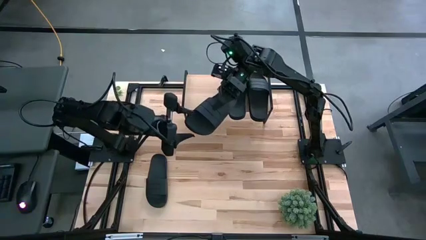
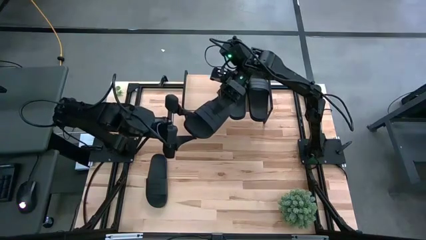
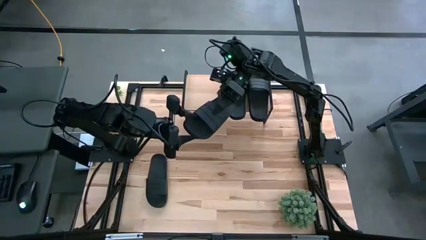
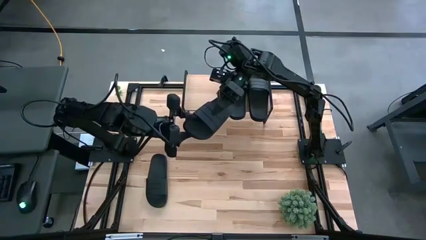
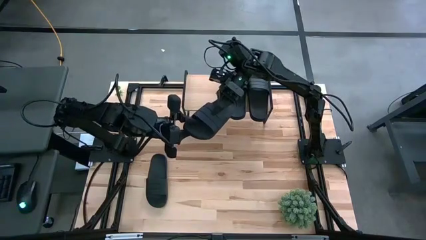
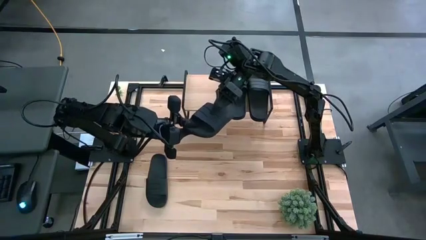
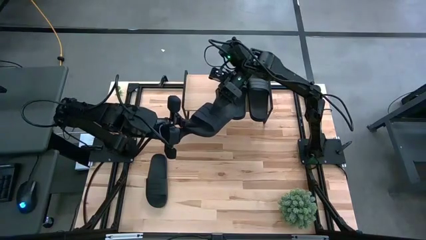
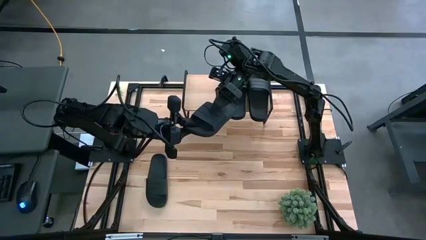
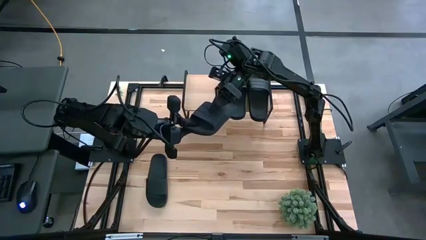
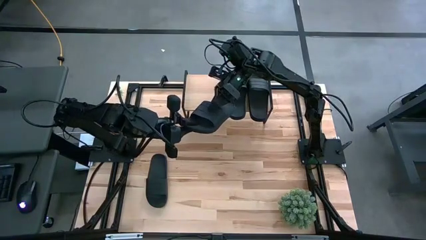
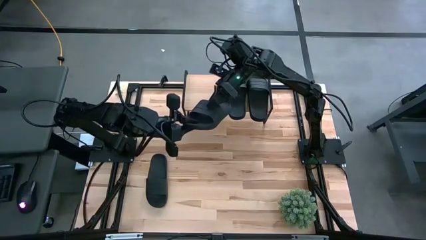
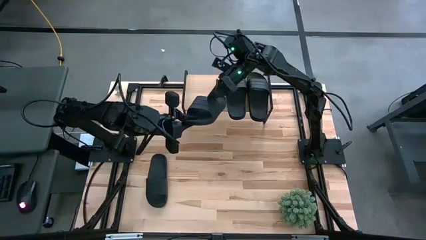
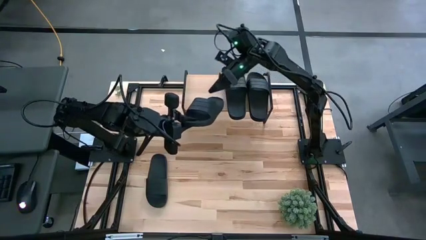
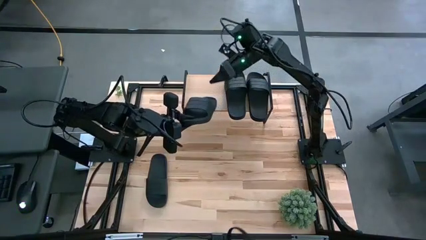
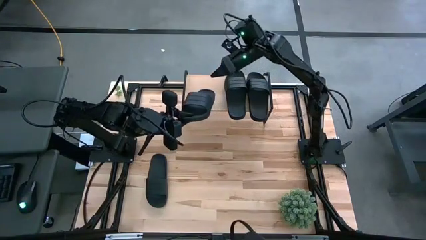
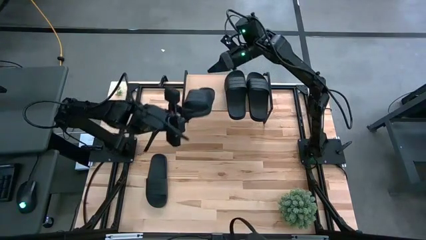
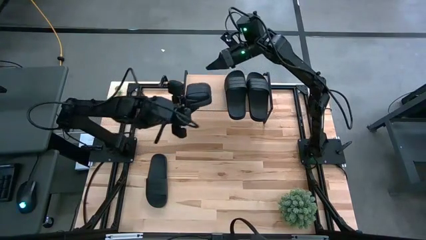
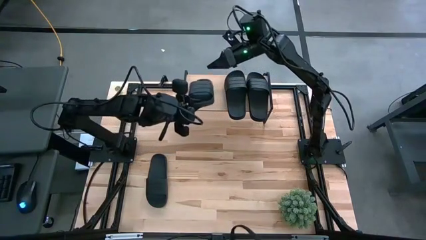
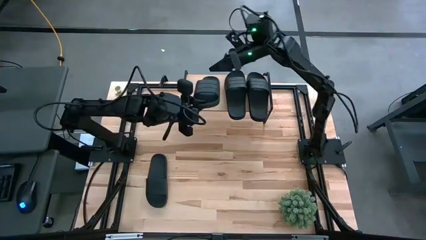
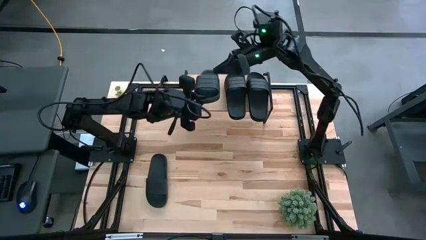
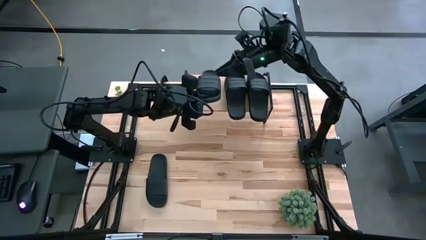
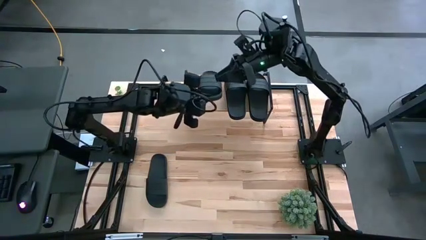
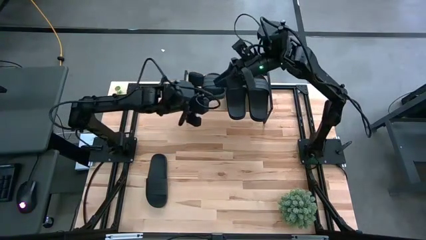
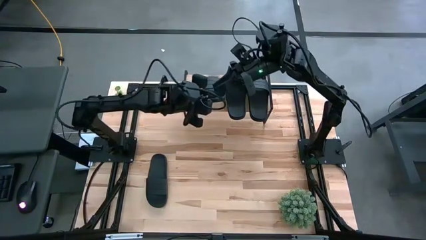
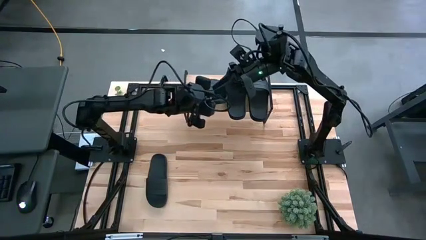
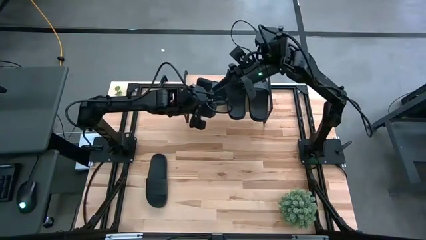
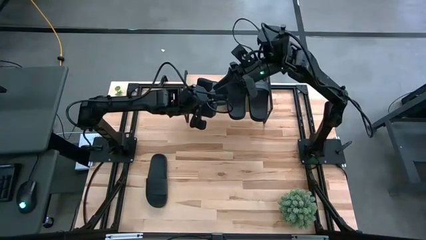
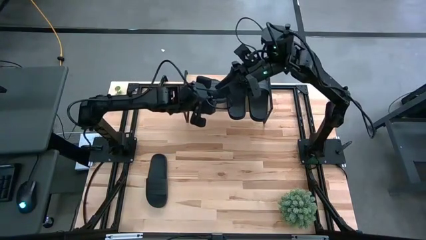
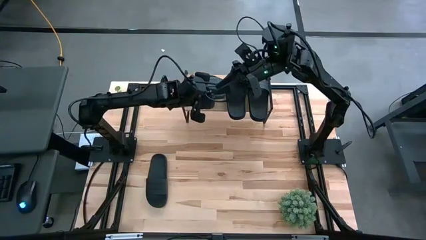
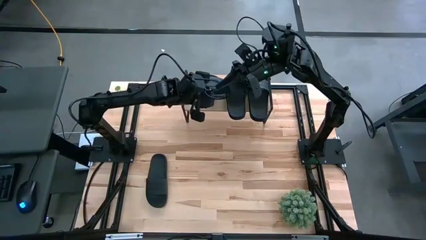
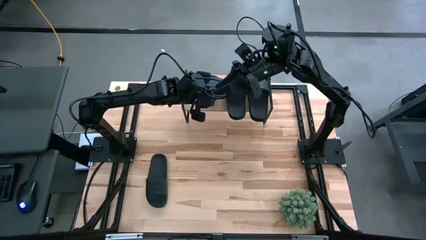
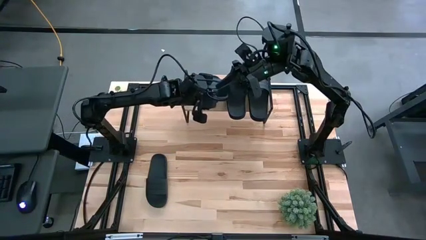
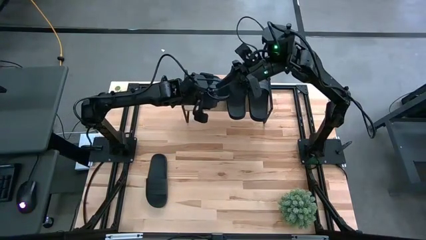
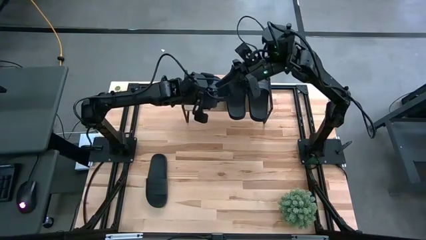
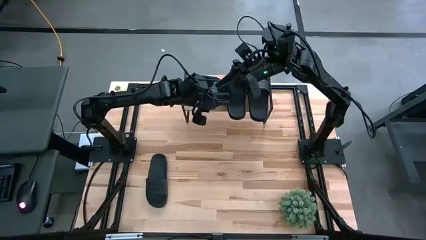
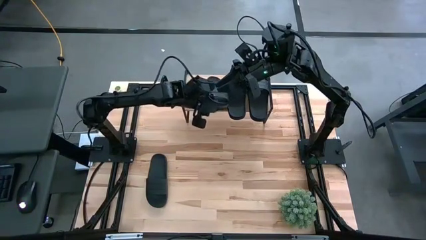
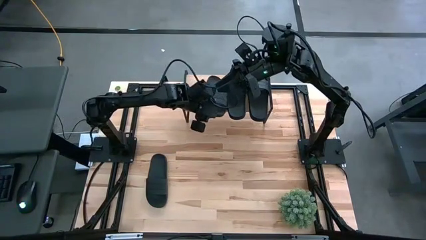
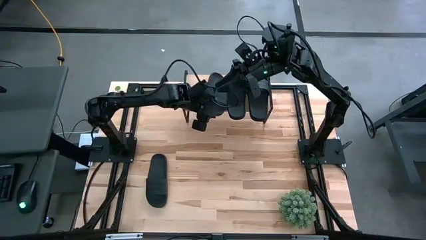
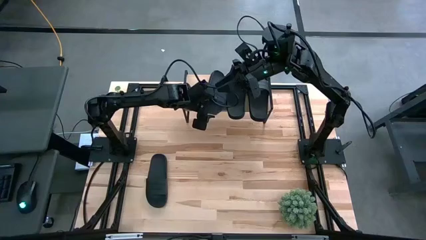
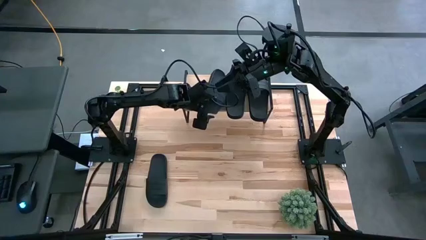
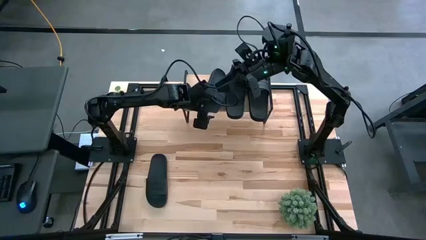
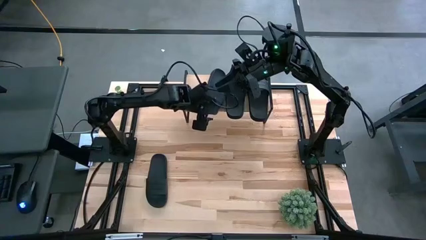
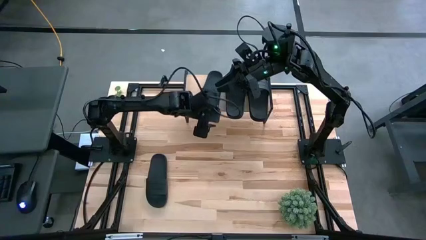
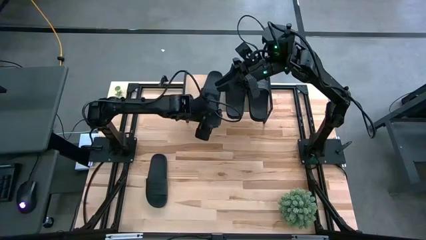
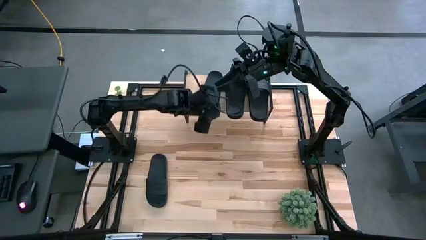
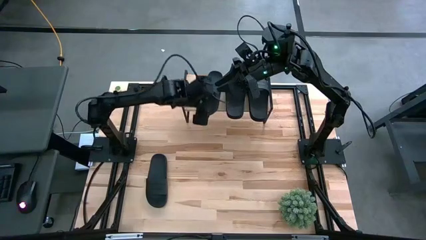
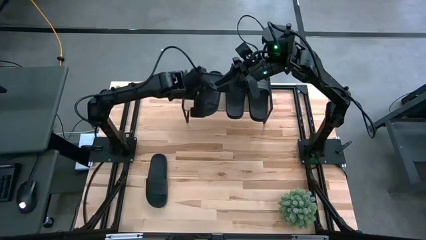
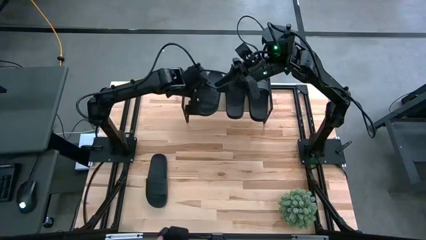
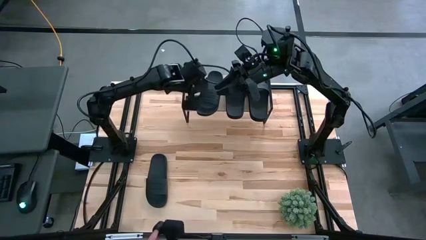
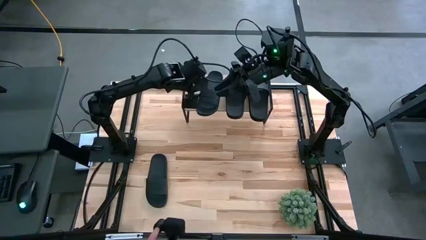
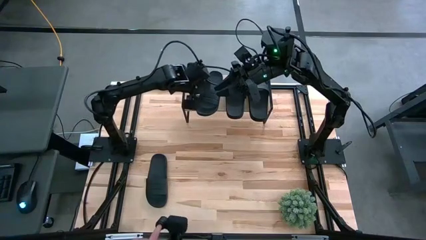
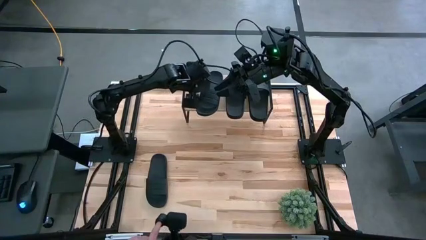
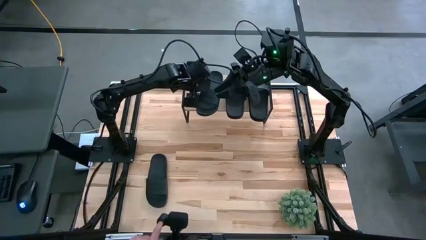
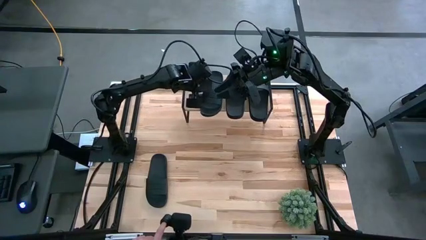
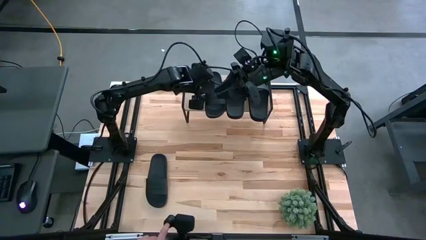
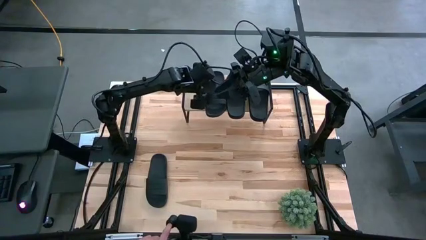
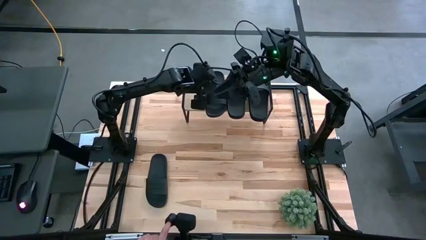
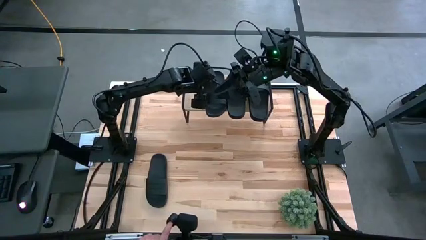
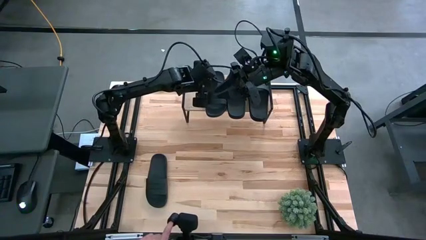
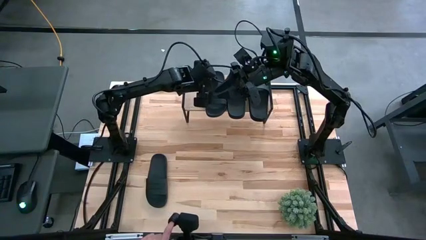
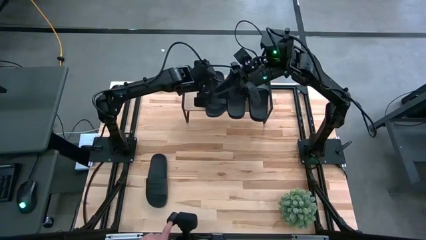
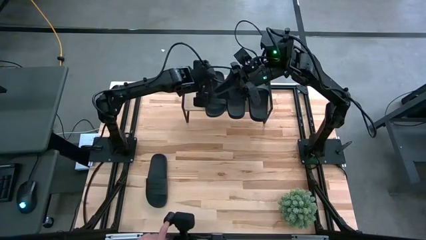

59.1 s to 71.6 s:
Task: Pick and place slides into the shelf
Put the black slide on the shelf

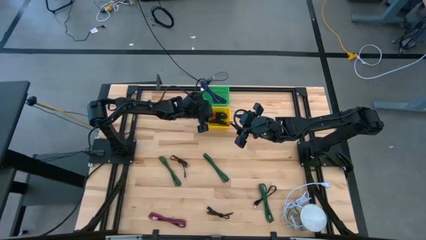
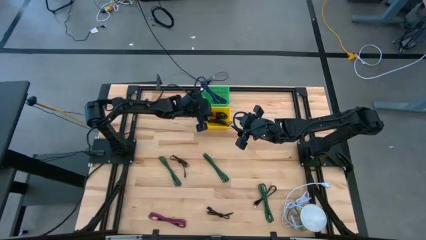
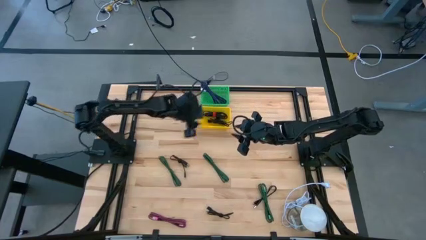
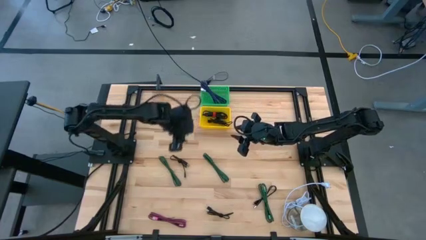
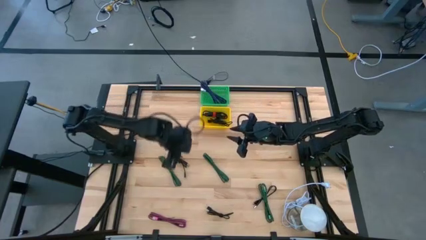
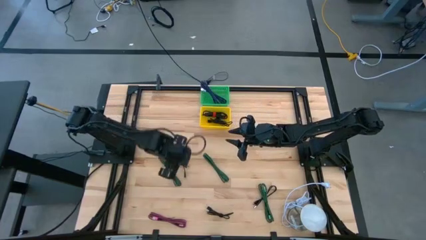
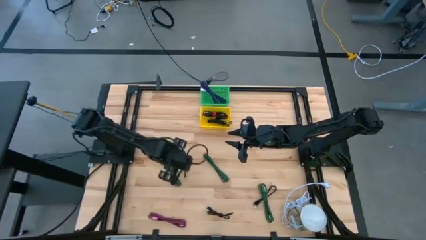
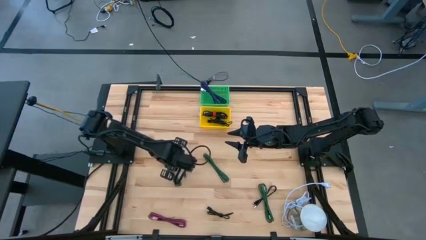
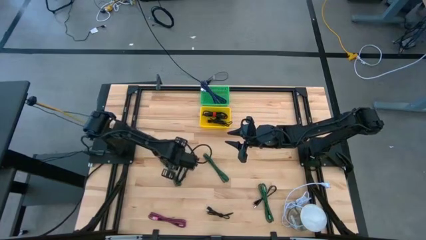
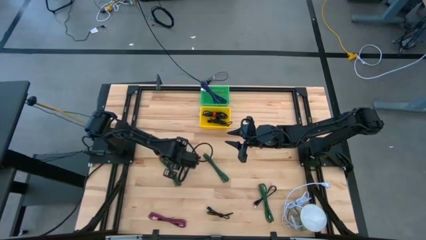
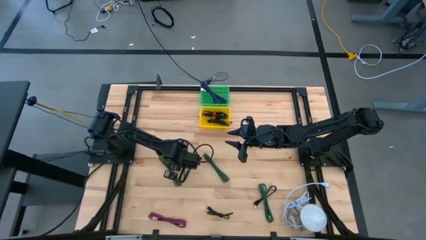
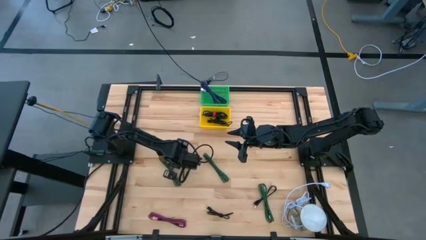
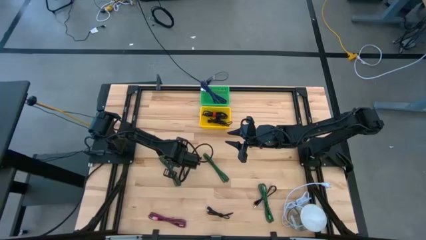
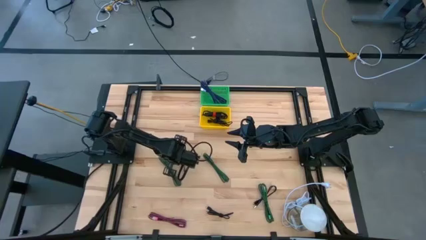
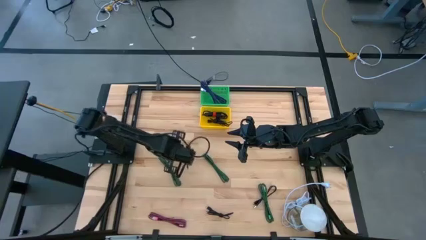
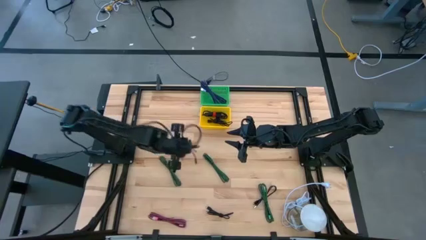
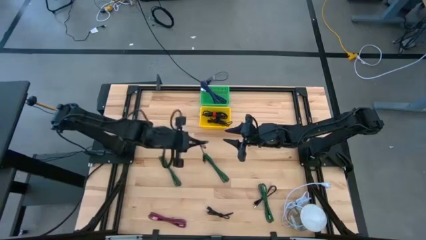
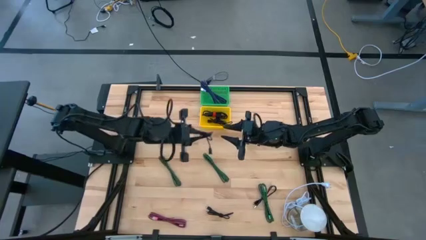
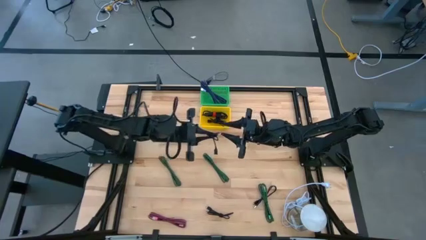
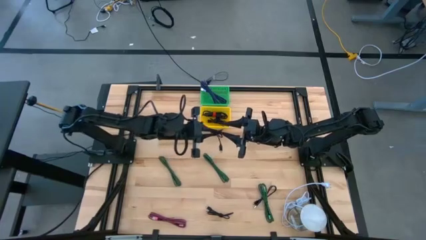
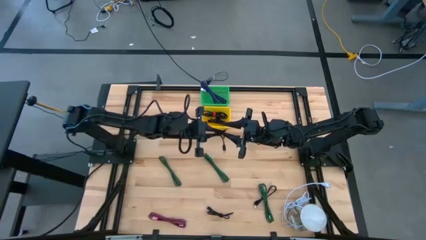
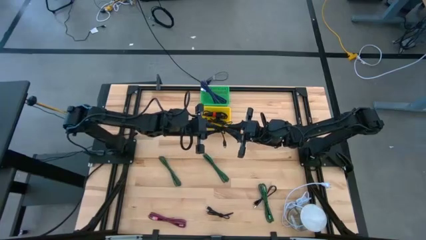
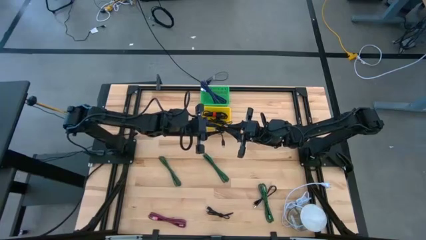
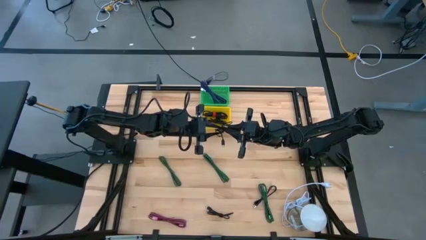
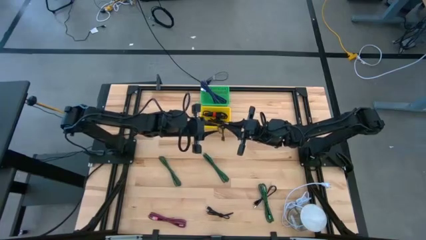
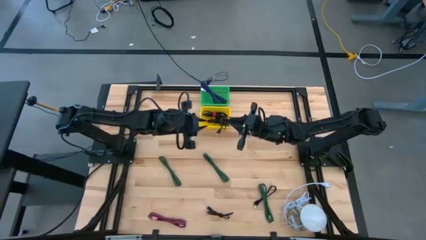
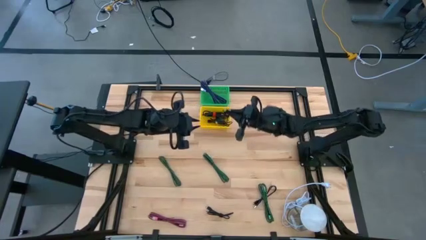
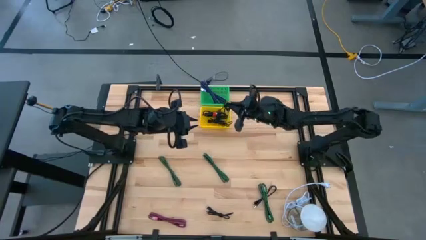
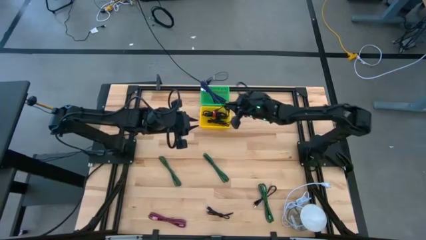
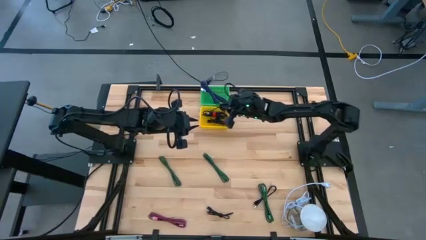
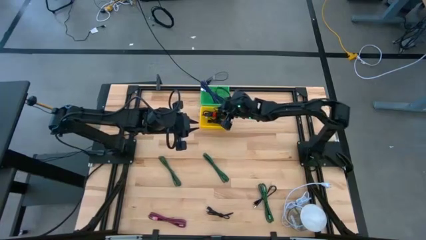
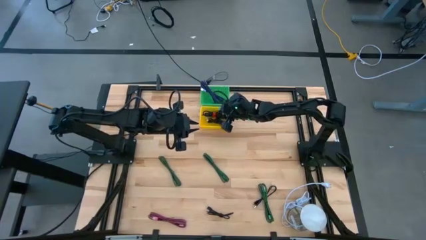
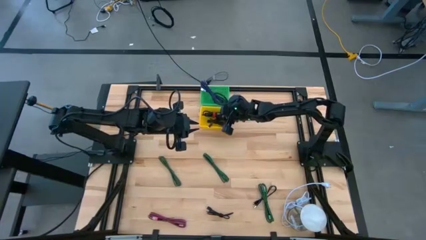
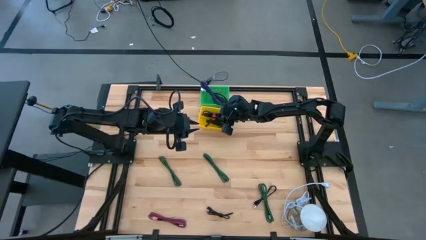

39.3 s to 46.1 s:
Task: Pick & Place USB Port
Put the black charger cable into the yellow basket
